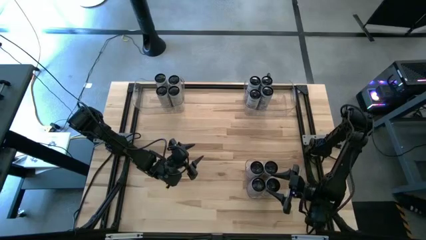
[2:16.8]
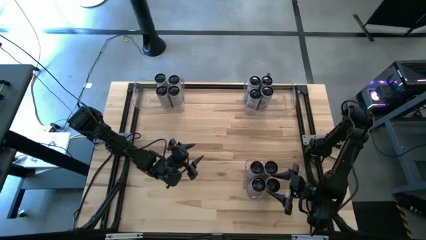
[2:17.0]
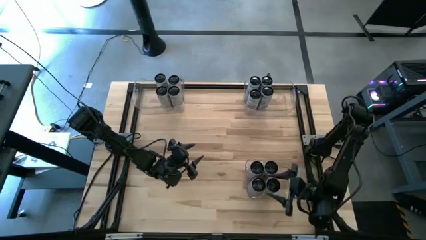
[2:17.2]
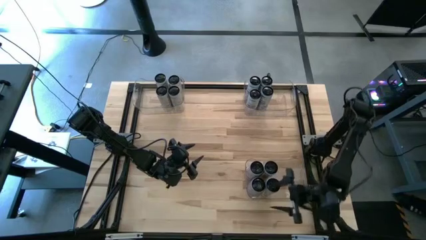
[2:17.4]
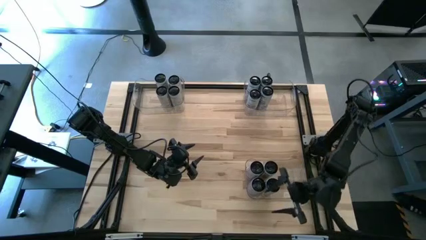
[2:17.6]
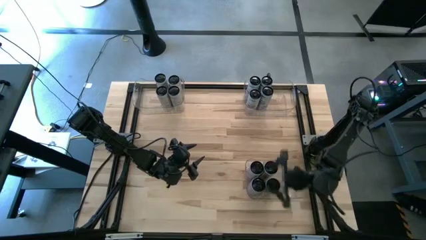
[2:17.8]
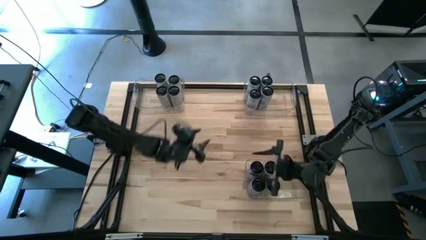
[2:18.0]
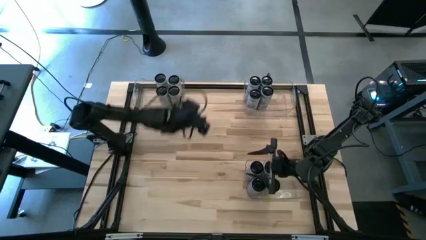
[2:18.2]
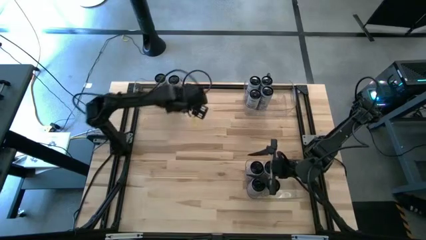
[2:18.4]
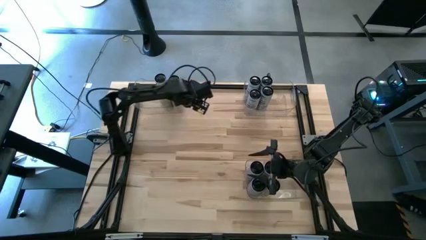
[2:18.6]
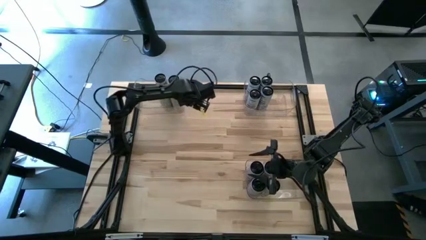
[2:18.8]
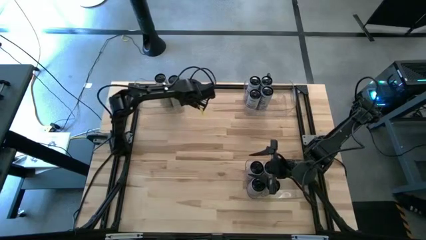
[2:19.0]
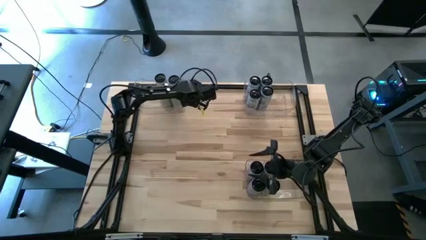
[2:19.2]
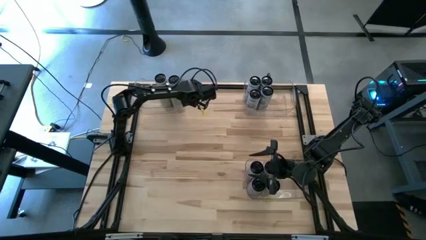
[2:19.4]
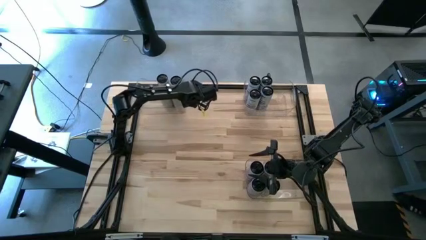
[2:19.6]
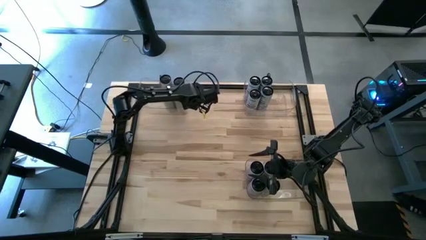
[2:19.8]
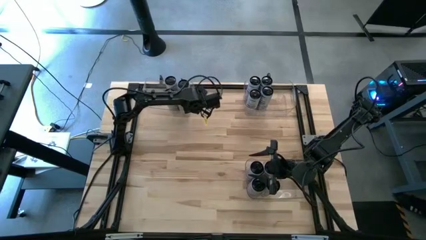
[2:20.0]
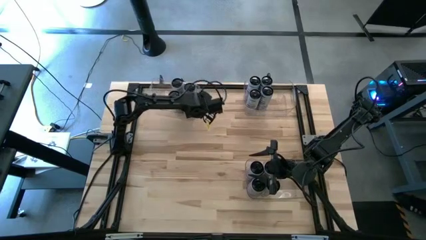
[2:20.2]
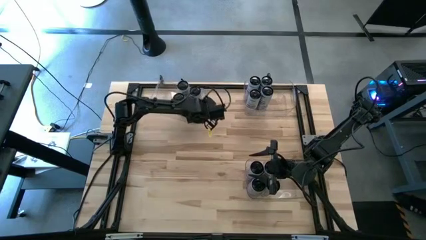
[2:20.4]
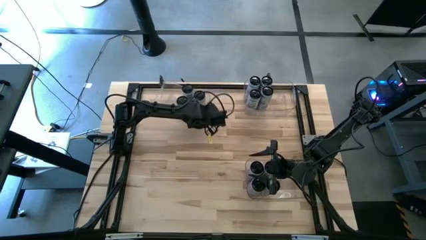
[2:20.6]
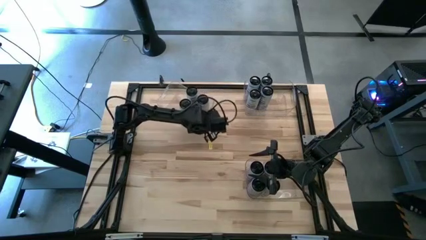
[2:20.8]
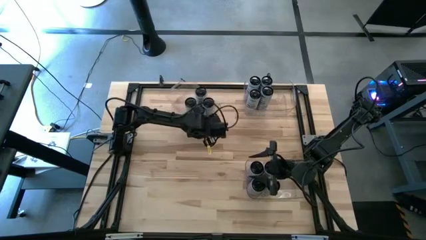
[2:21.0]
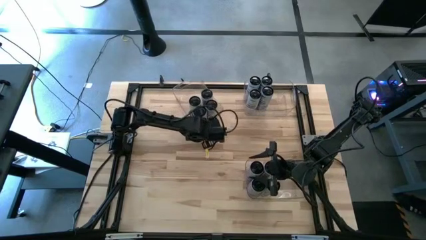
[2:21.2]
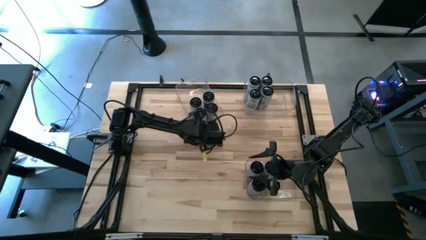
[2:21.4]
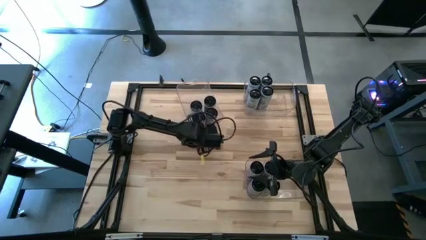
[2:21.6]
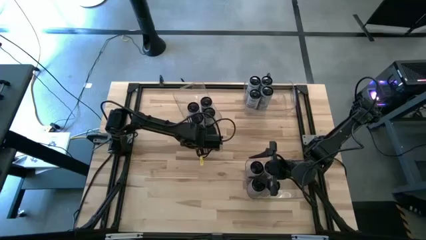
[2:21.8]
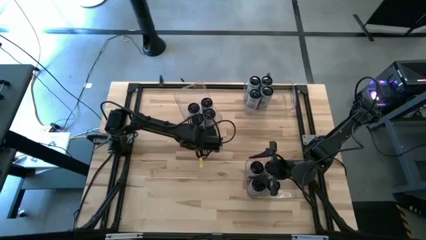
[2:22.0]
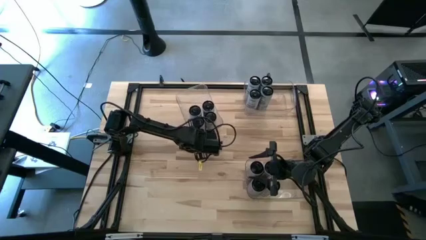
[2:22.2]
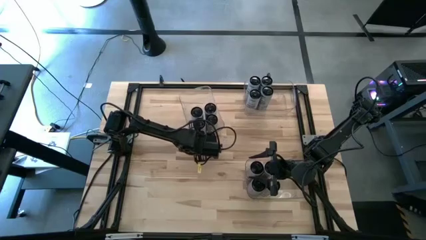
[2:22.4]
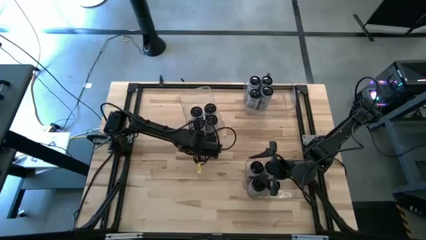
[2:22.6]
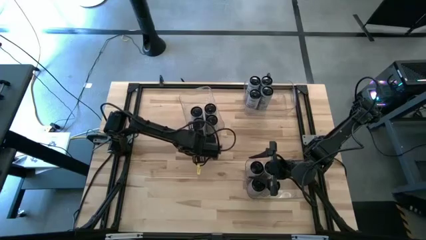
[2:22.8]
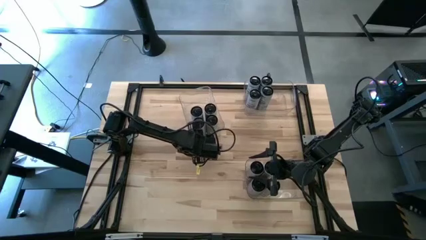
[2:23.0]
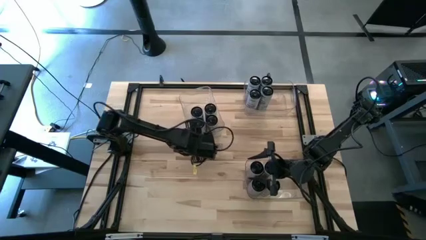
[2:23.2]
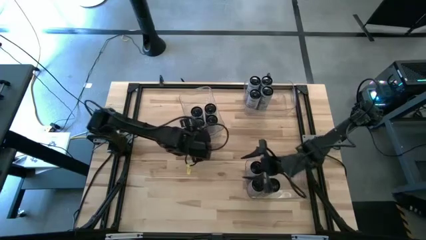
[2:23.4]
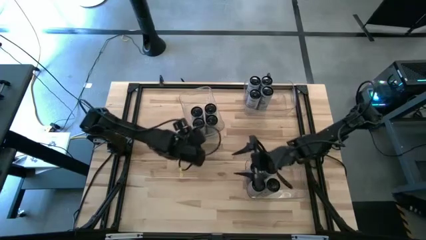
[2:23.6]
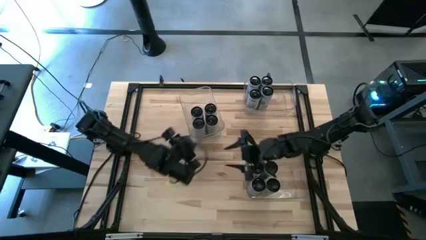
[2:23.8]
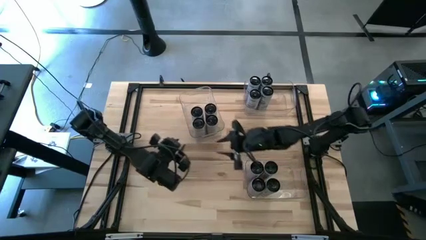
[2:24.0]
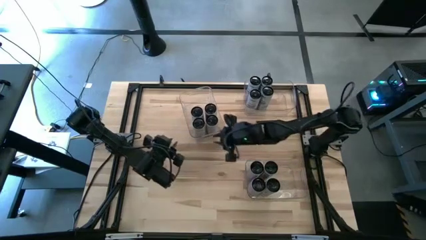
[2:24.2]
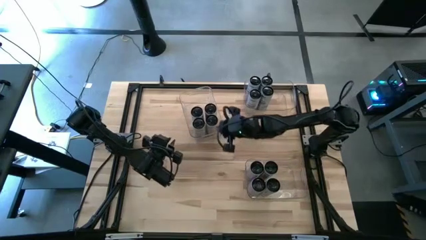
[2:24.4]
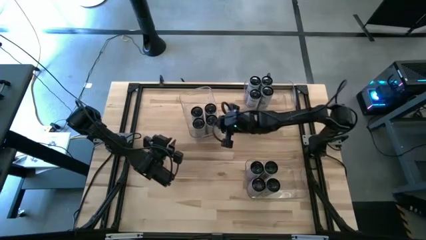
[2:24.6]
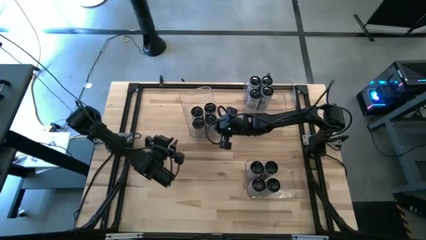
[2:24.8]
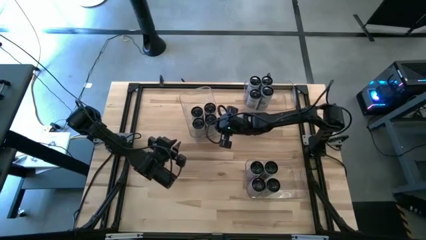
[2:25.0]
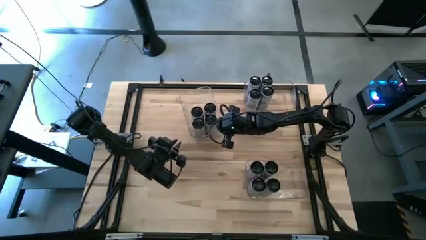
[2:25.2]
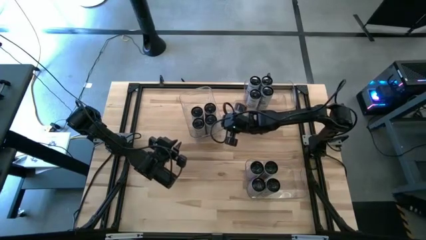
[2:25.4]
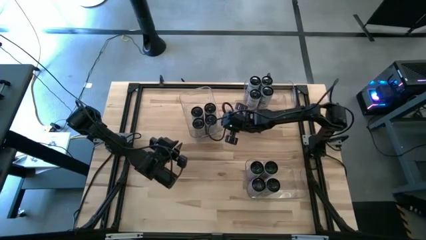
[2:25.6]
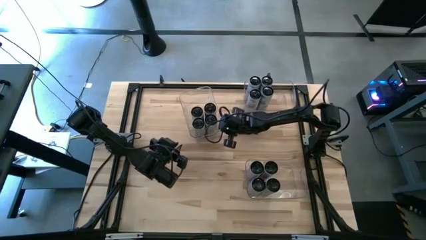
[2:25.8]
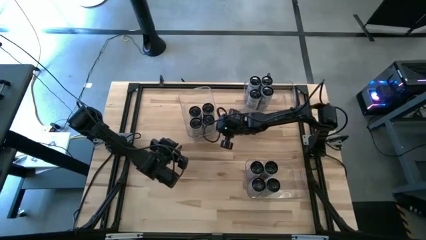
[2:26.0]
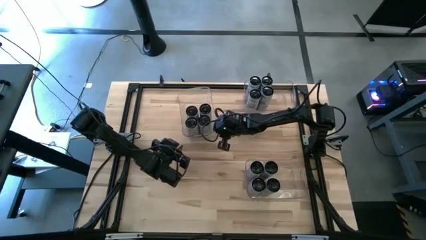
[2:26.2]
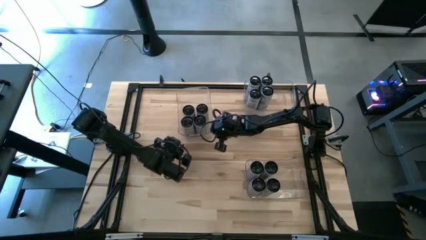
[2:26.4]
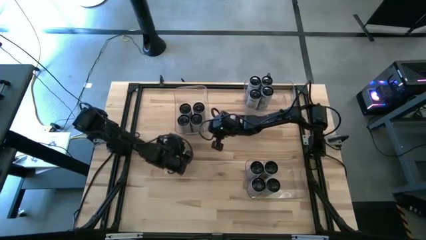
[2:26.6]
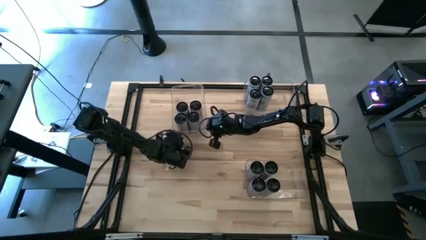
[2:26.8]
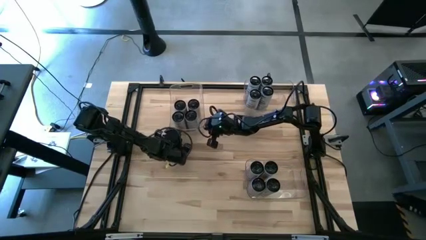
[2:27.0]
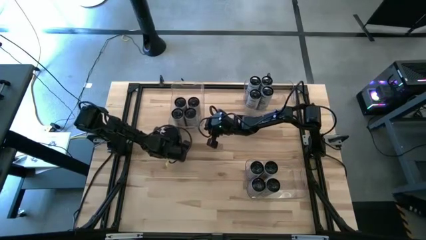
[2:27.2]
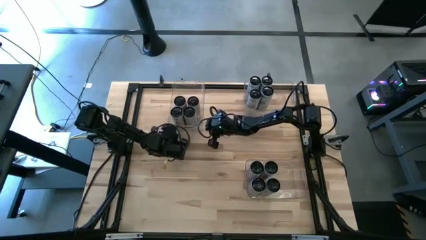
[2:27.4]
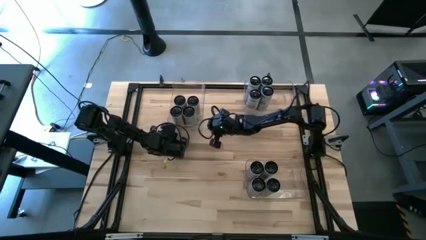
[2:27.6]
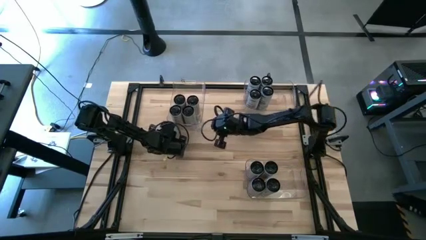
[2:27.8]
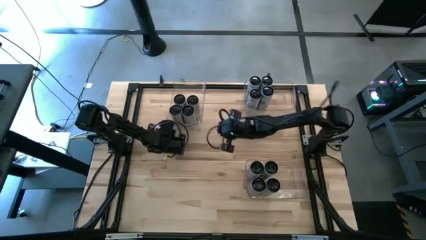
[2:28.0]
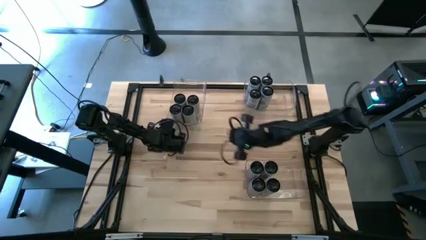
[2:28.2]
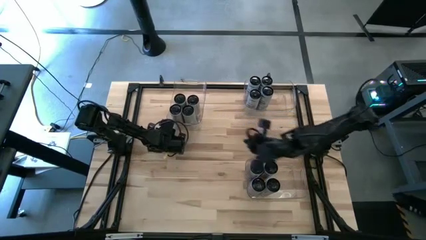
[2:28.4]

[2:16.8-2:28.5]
Task: Sort soda cans
Adjust the top left transparent bin
